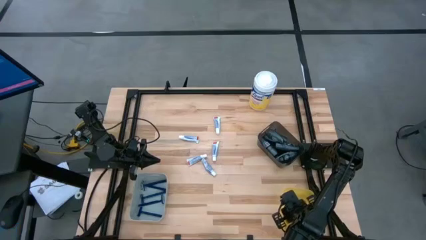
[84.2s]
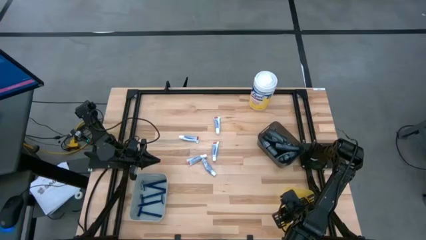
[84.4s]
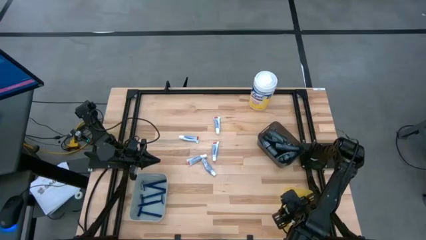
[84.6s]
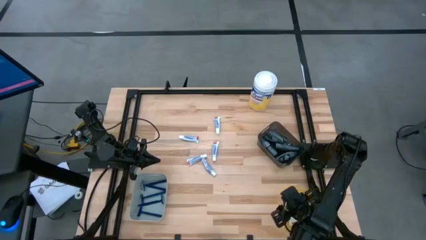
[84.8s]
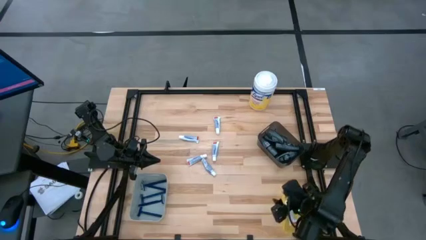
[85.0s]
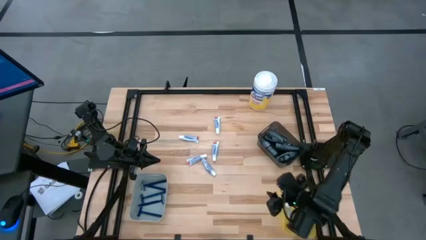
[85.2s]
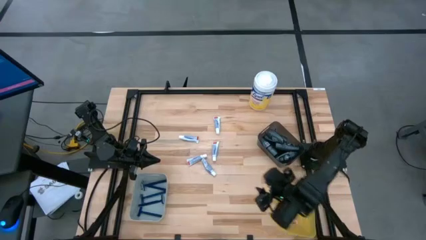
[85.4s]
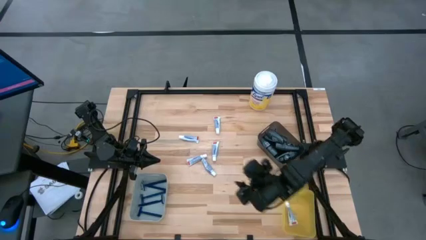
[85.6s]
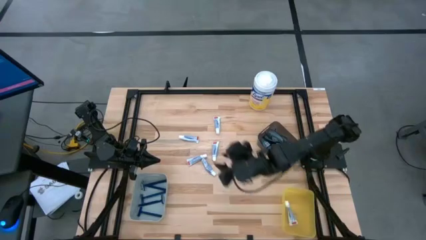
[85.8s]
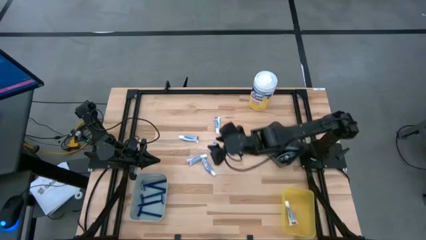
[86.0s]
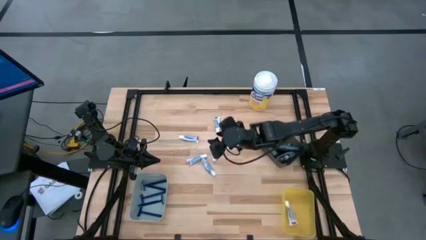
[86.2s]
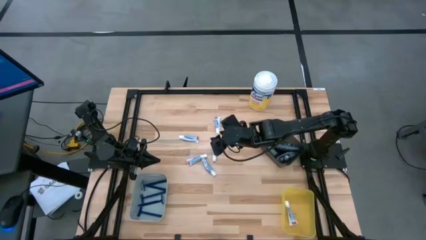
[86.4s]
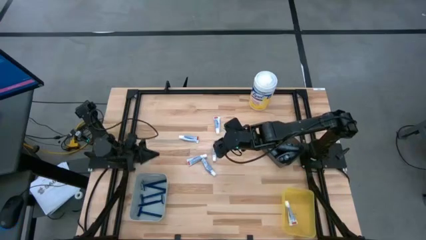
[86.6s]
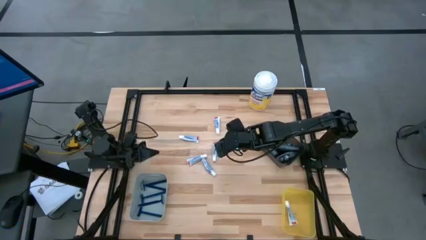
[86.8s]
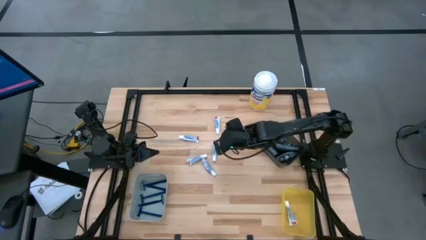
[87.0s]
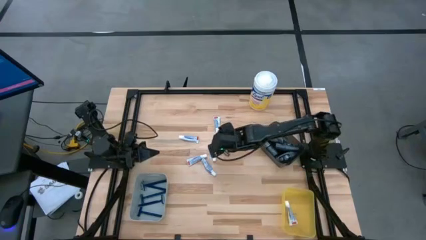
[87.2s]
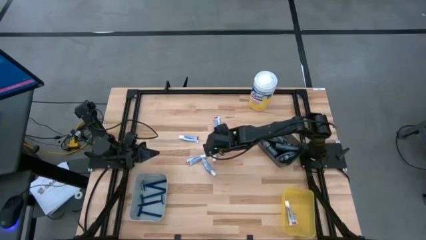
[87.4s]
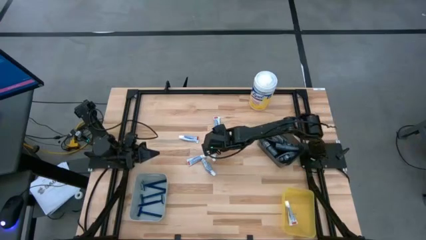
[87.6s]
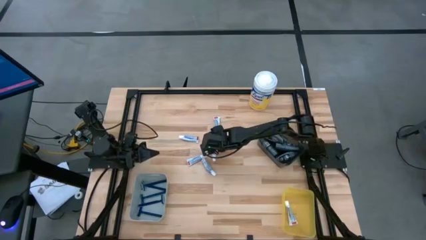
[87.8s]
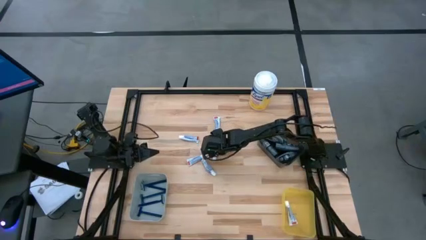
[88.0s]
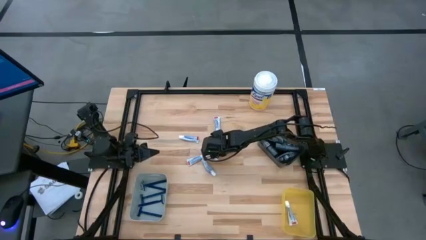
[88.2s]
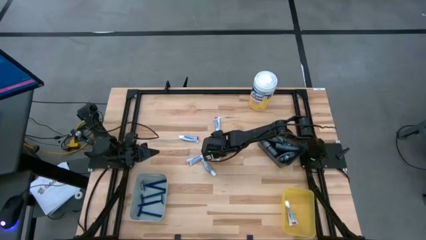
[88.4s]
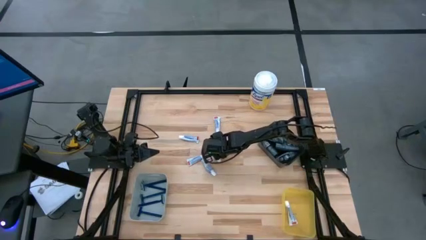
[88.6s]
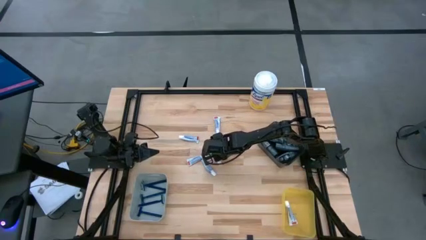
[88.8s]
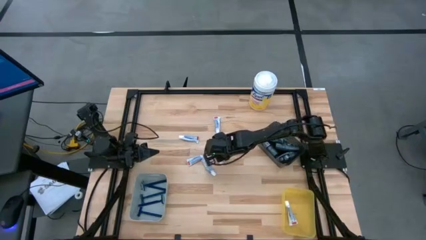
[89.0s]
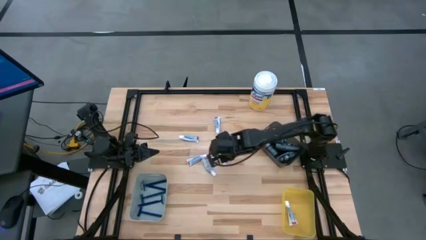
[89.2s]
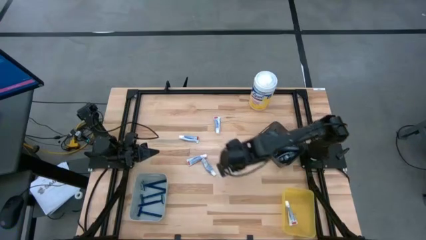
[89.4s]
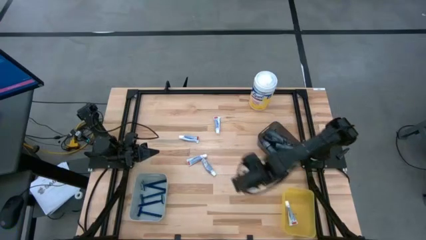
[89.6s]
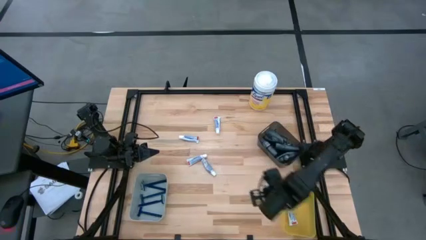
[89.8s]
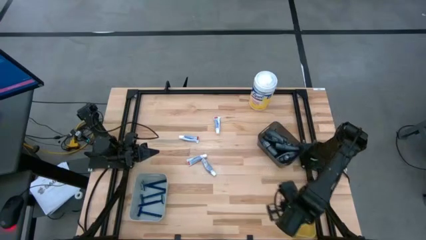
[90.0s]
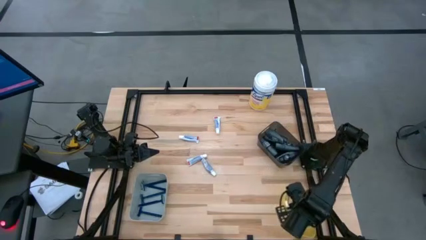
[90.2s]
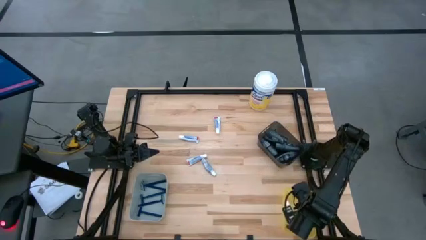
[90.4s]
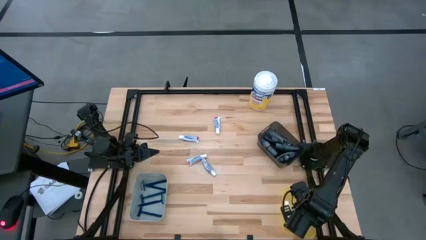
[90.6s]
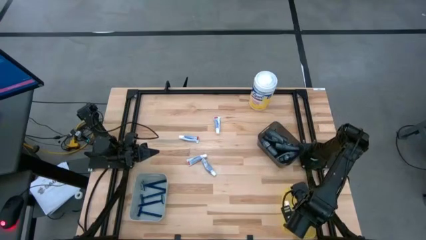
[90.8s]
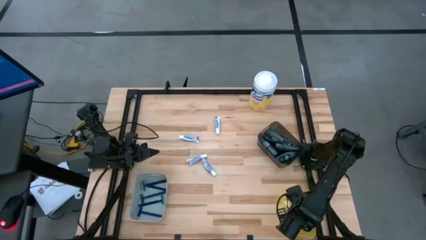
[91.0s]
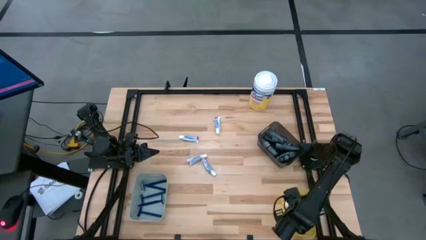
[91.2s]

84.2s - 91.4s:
Task: Pick & Place Travel size toiletries
Put the white toothpaste tube into the yellow bin

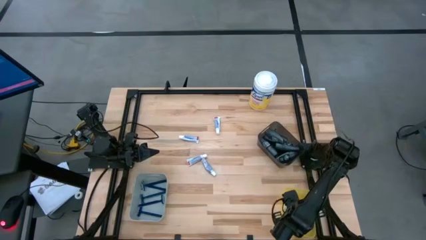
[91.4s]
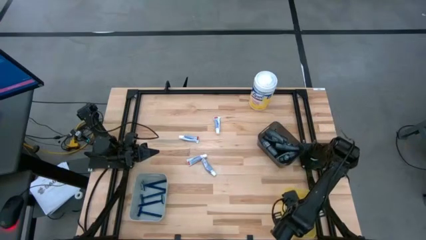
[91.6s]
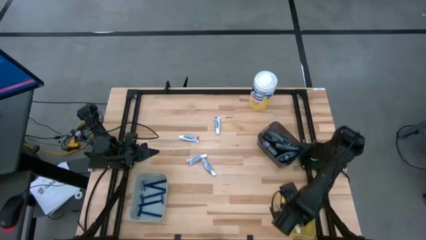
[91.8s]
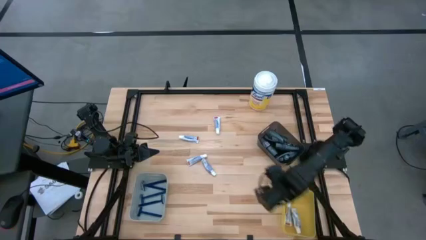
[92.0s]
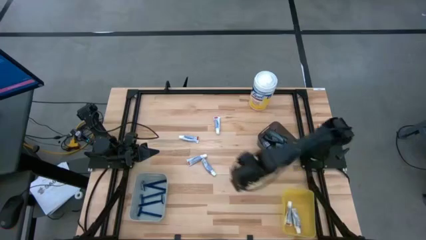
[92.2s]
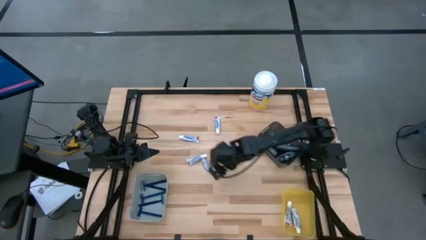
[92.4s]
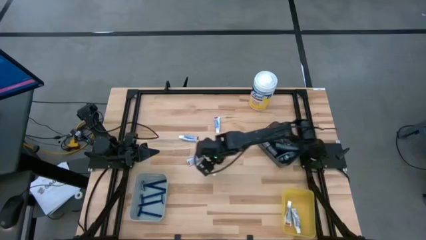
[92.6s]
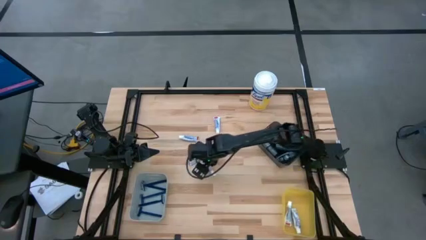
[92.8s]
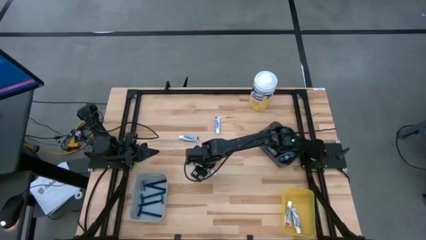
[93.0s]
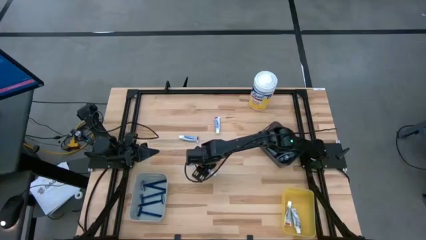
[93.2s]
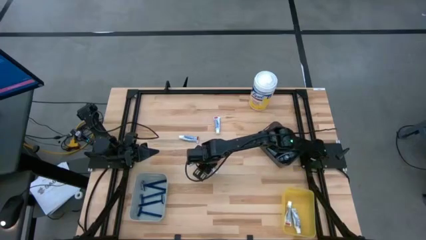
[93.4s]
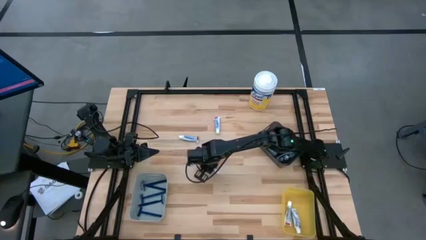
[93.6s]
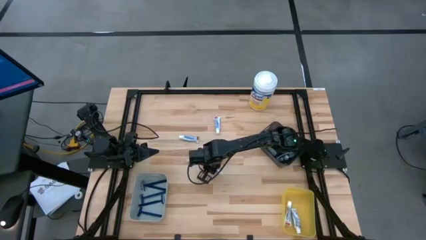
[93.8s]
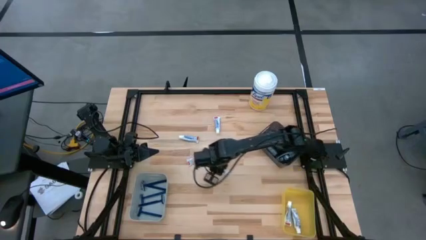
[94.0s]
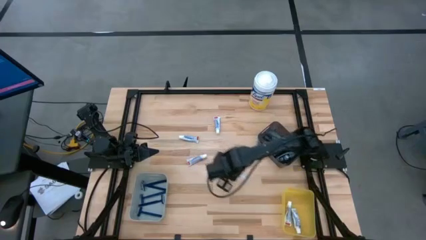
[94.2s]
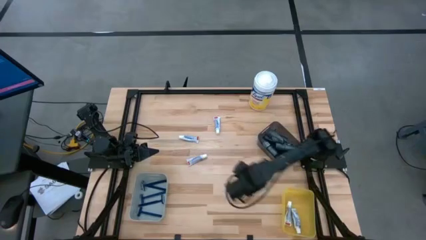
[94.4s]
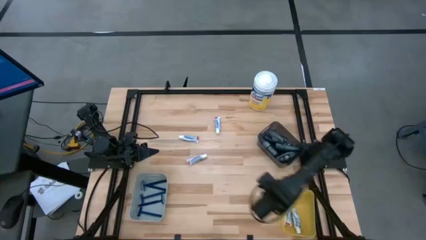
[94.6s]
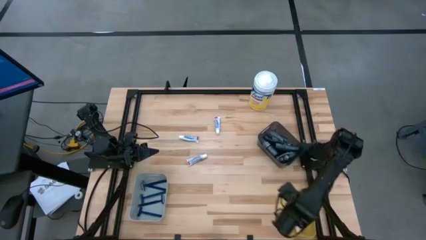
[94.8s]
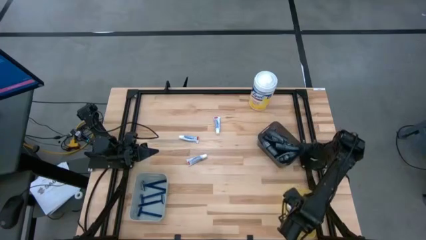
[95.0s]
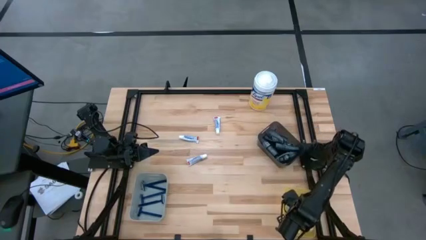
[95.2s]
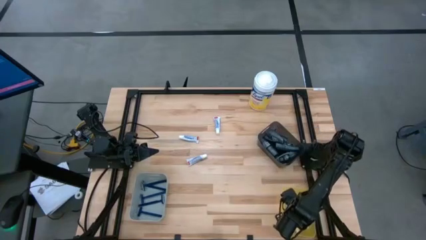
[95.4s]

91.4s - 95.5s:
Put the white toothpaste tube into the yellow bin

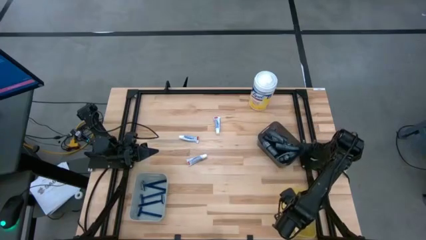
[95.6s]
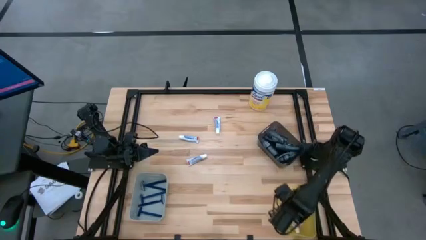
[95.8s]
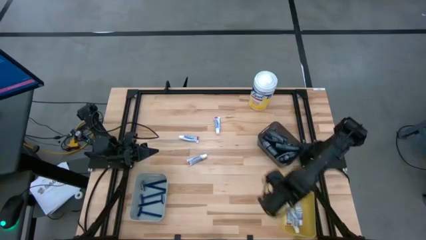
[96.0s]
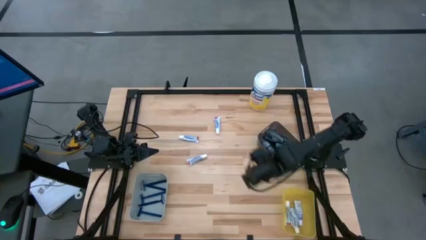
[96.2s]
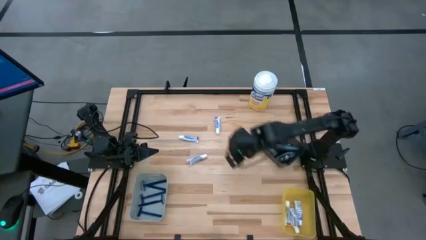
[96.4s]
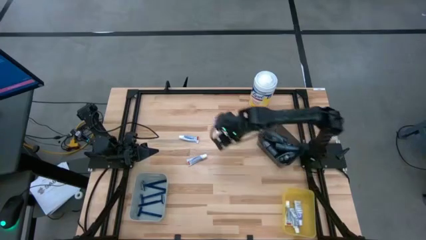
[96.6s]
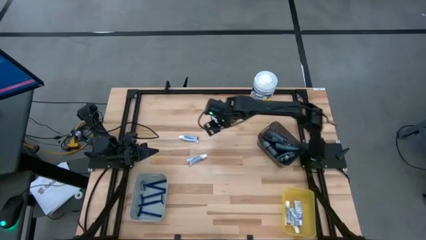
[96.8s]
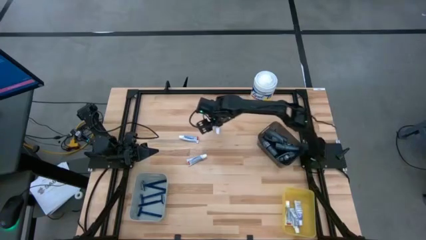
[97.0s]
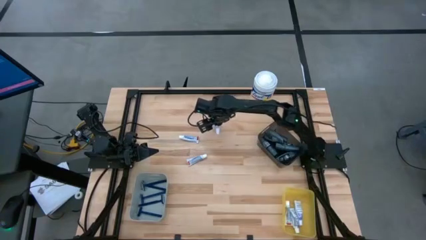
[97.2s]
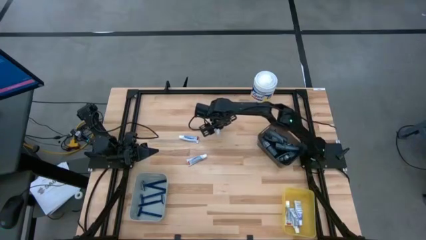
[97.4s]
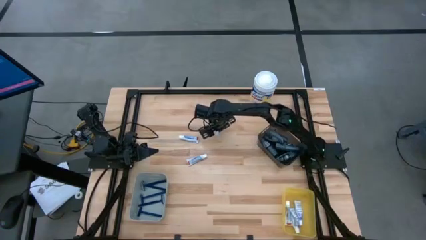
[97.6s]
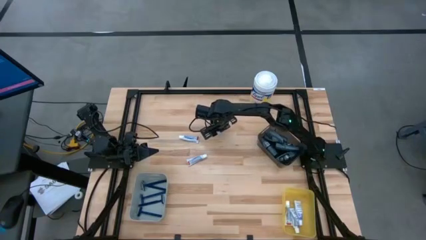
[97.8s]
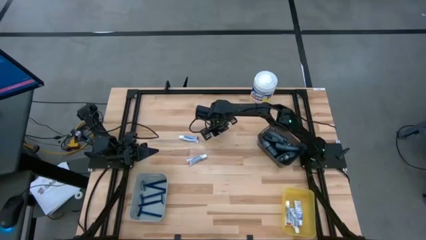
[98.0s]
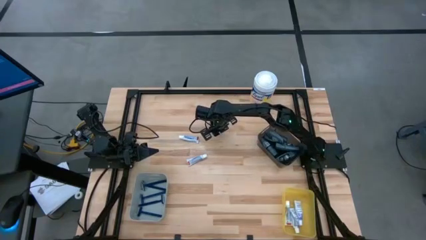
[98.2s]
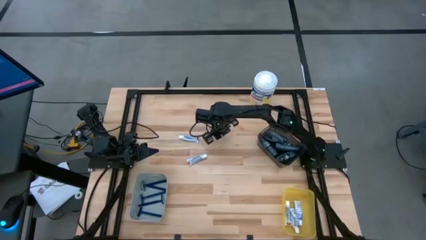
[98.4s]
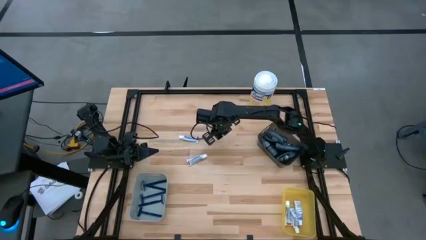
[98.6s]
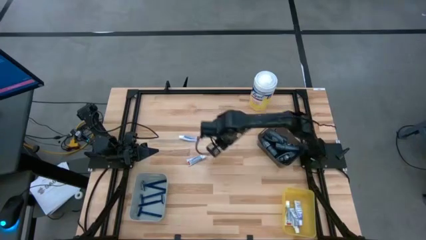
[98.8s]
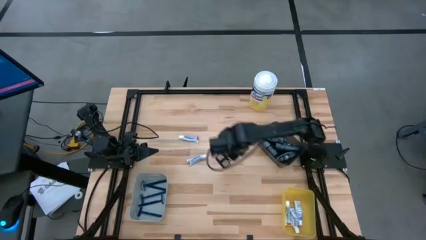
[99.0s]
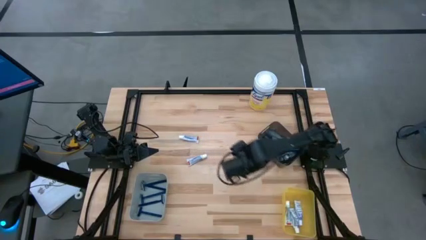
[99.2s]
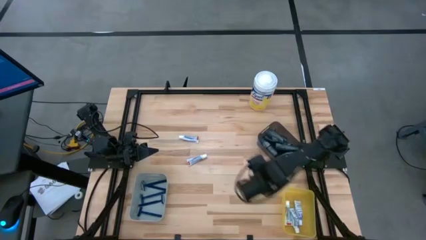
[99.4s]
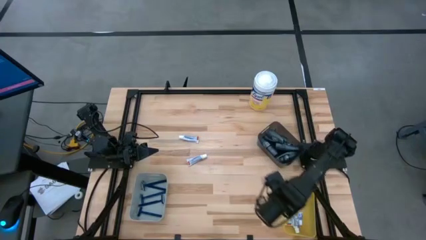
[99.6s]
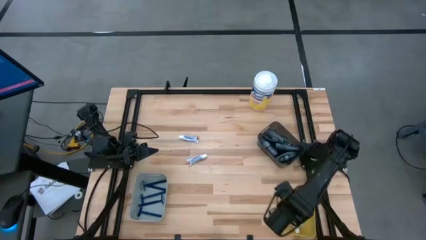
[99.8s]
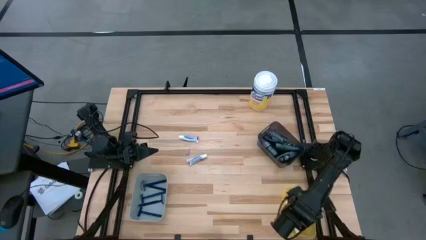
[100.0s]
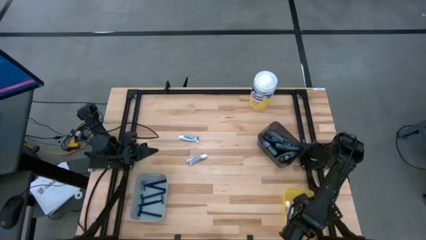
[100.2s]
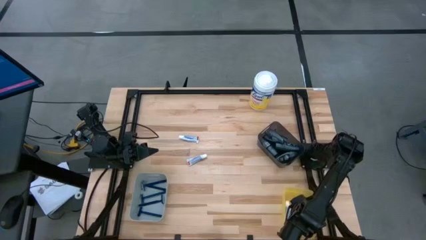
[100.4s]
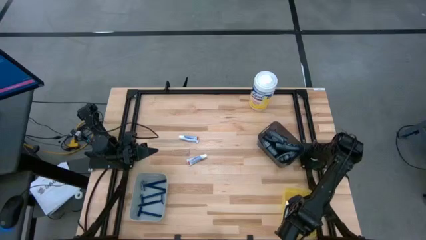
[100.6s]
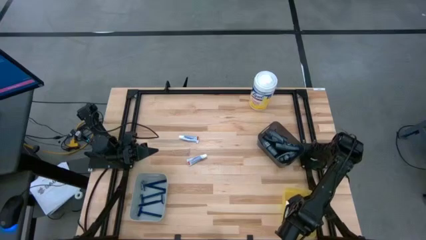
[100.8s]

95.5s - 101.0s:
Put the white toothpaste tube into the yellow bin
